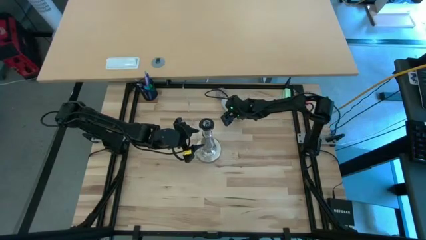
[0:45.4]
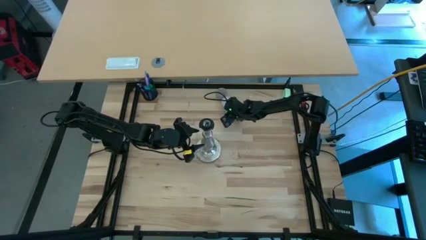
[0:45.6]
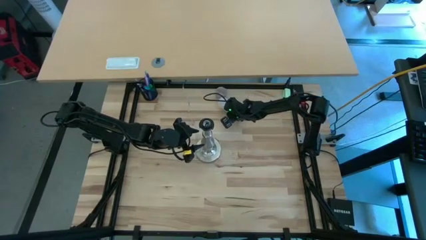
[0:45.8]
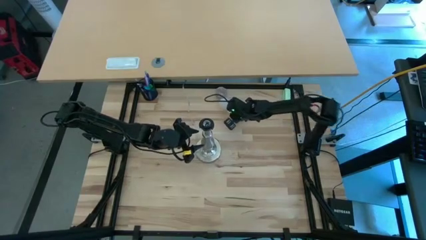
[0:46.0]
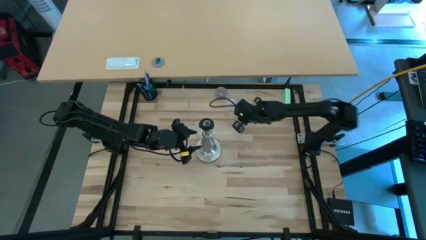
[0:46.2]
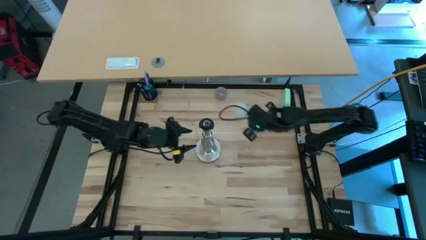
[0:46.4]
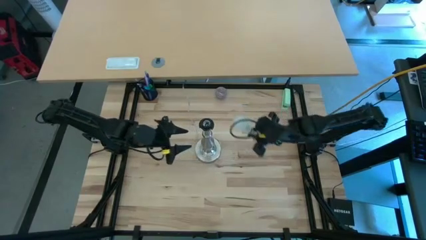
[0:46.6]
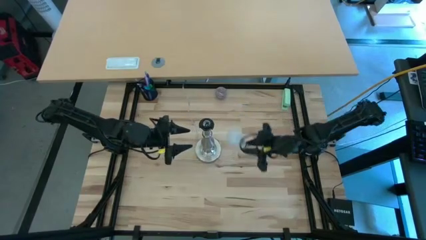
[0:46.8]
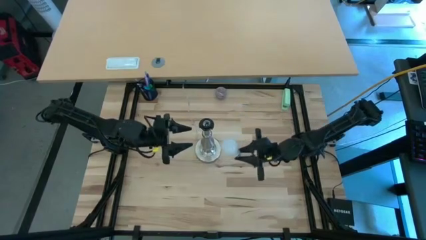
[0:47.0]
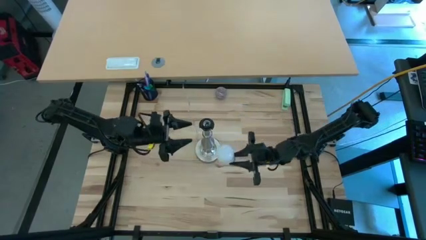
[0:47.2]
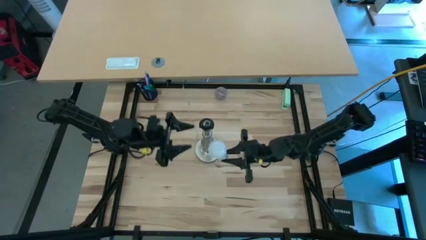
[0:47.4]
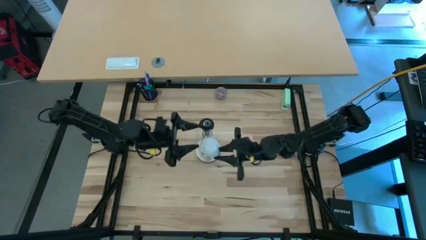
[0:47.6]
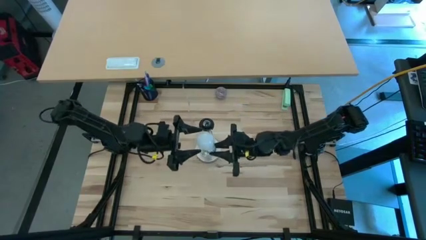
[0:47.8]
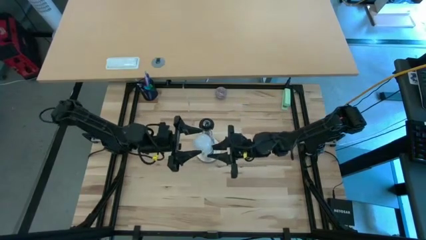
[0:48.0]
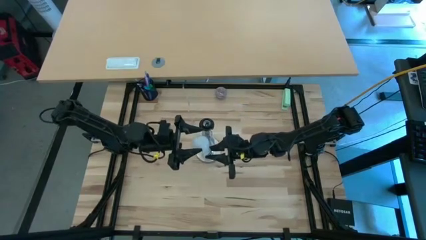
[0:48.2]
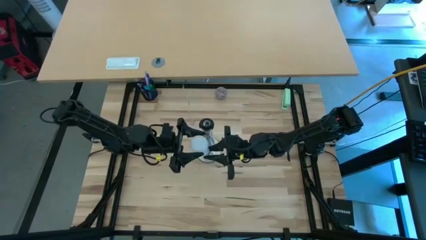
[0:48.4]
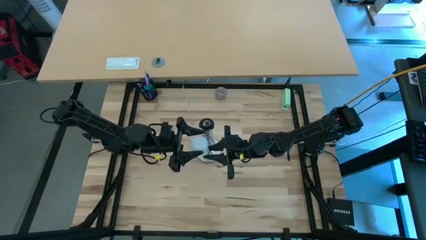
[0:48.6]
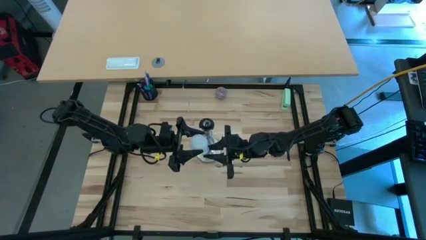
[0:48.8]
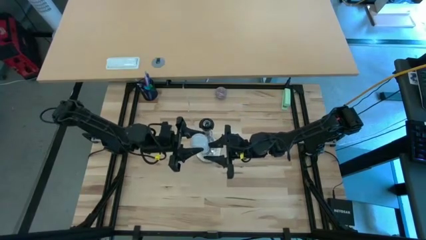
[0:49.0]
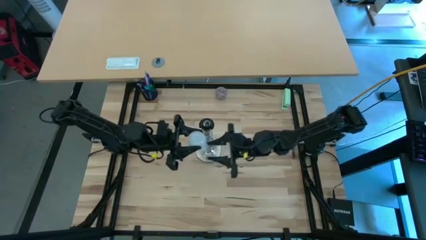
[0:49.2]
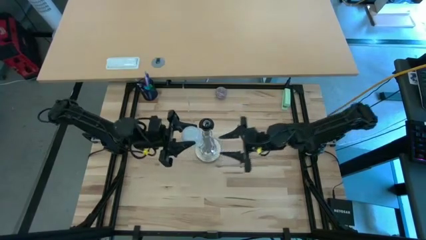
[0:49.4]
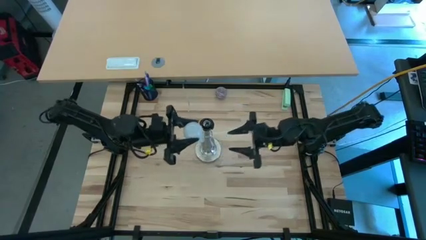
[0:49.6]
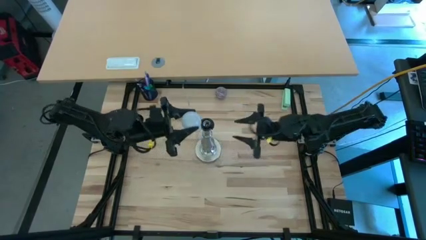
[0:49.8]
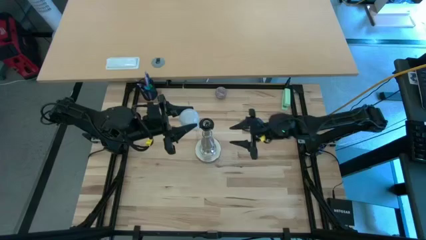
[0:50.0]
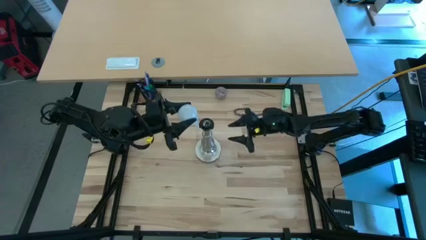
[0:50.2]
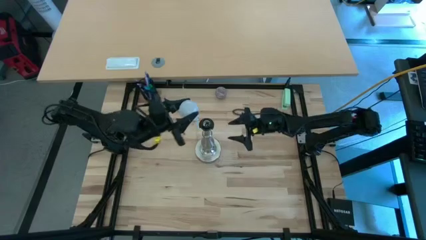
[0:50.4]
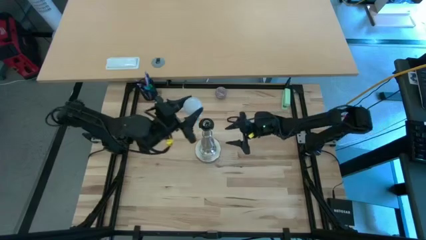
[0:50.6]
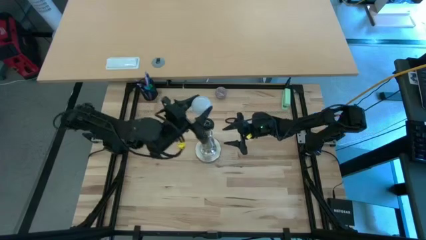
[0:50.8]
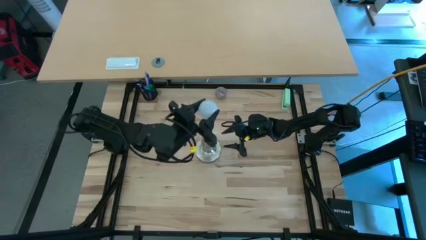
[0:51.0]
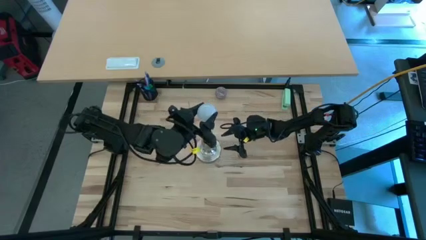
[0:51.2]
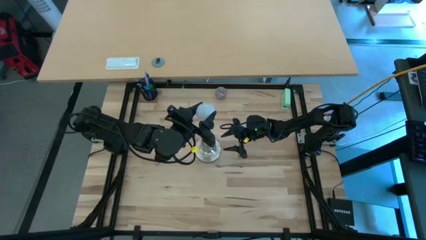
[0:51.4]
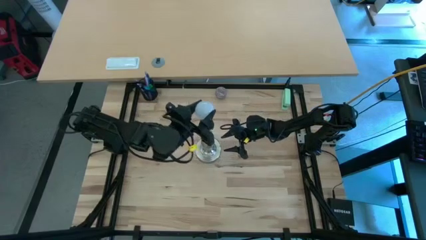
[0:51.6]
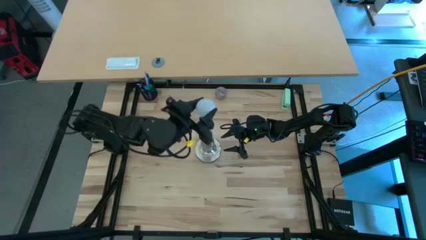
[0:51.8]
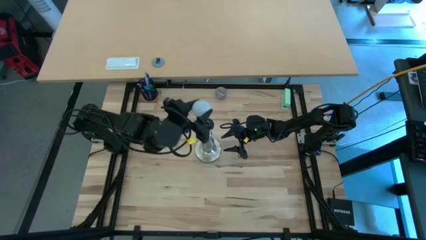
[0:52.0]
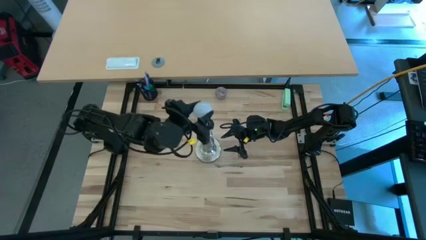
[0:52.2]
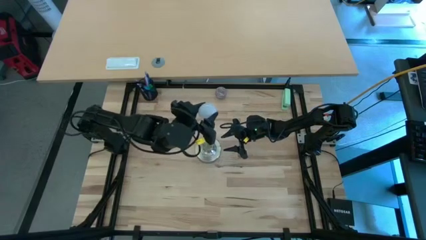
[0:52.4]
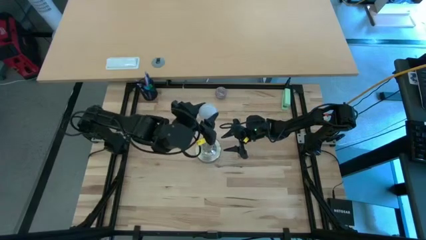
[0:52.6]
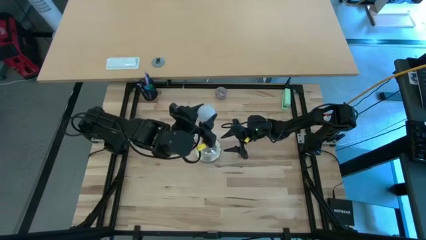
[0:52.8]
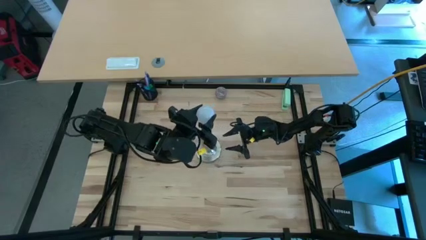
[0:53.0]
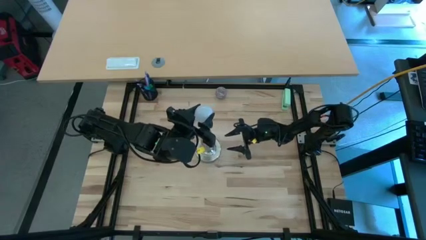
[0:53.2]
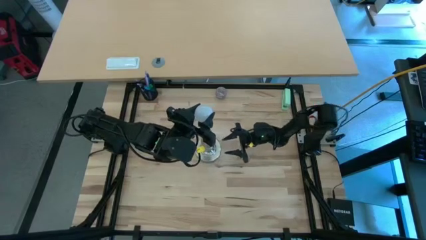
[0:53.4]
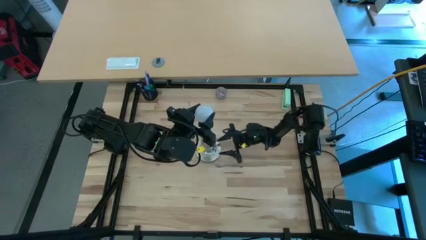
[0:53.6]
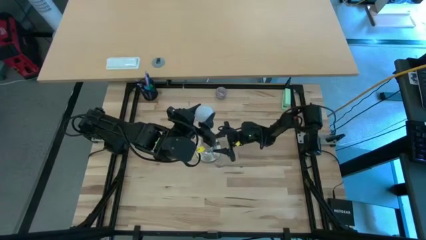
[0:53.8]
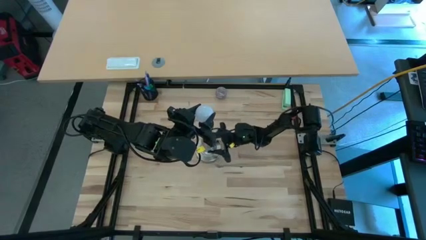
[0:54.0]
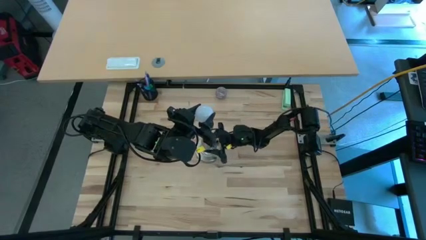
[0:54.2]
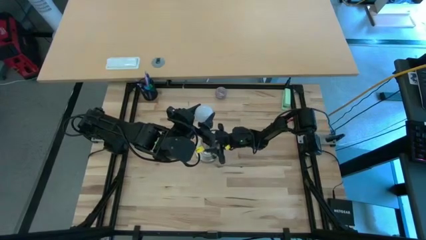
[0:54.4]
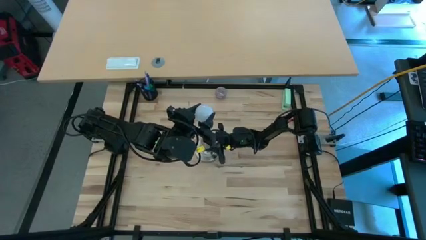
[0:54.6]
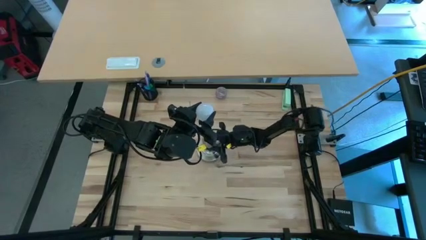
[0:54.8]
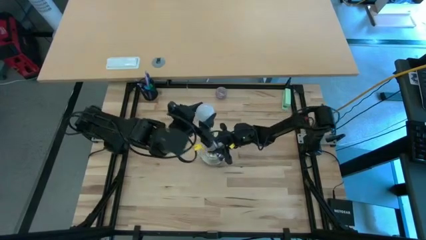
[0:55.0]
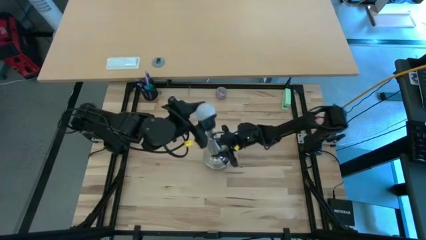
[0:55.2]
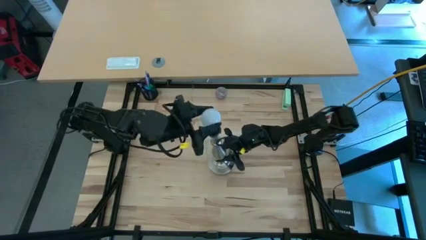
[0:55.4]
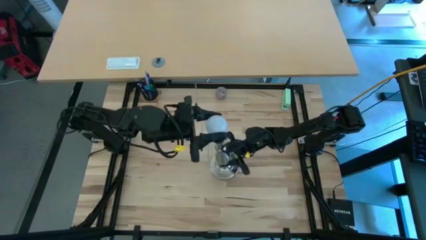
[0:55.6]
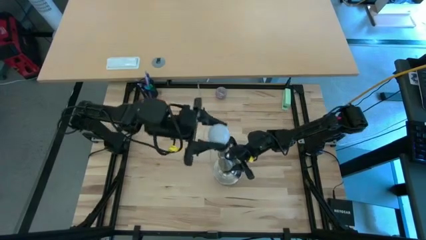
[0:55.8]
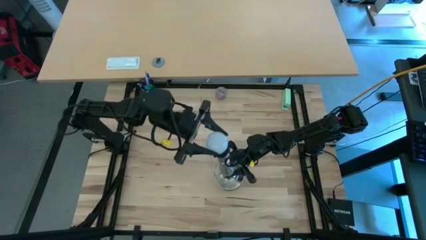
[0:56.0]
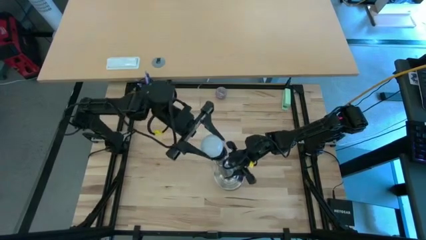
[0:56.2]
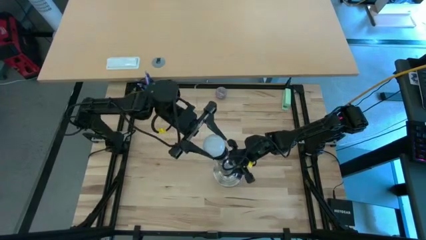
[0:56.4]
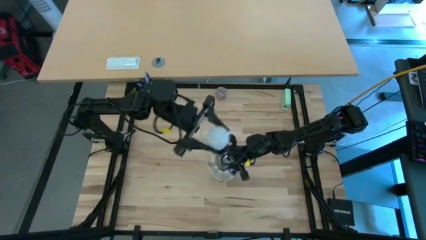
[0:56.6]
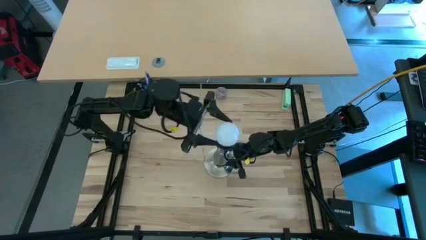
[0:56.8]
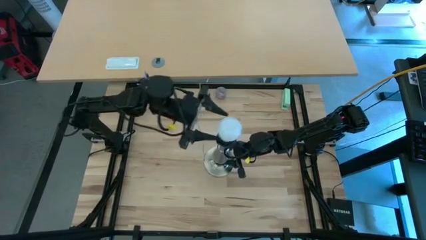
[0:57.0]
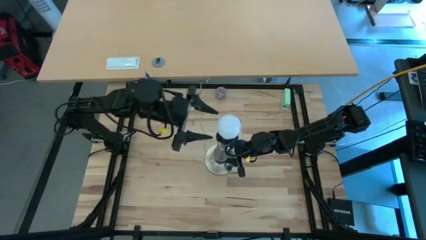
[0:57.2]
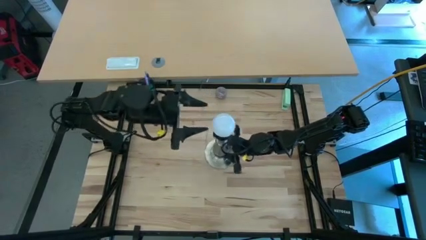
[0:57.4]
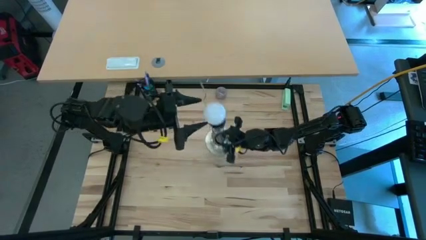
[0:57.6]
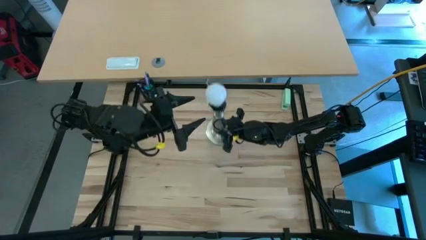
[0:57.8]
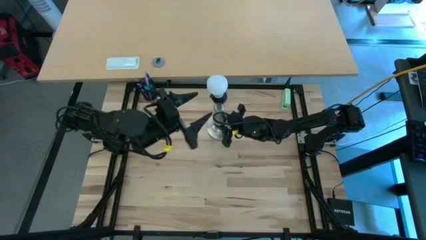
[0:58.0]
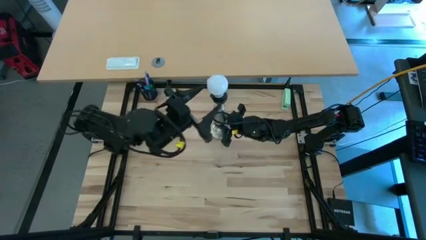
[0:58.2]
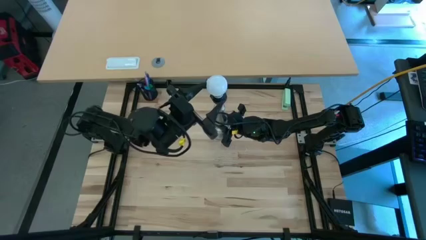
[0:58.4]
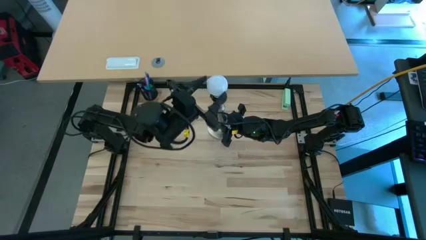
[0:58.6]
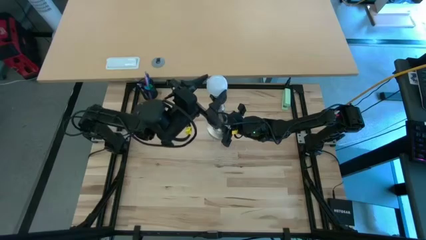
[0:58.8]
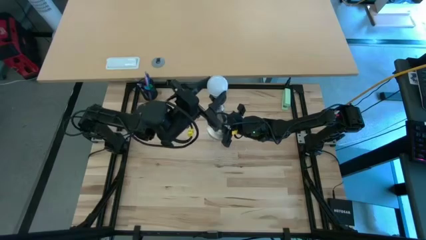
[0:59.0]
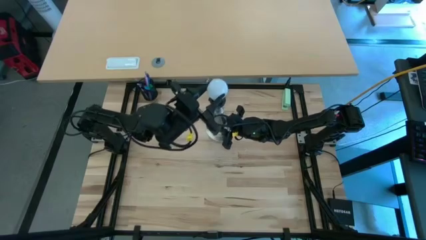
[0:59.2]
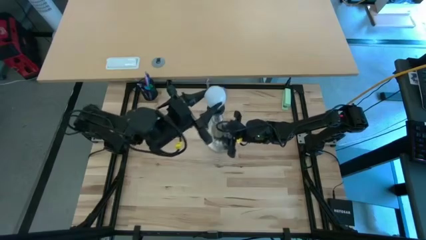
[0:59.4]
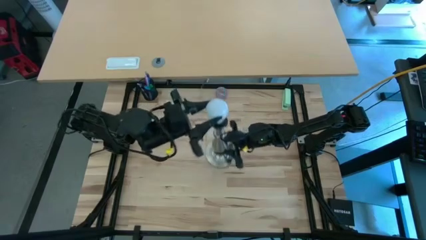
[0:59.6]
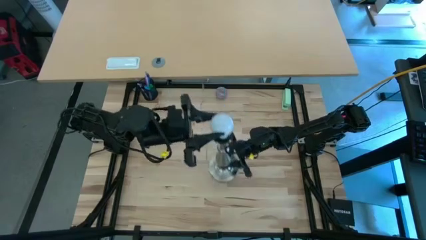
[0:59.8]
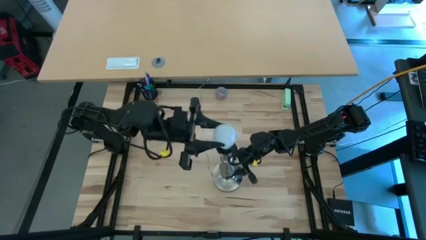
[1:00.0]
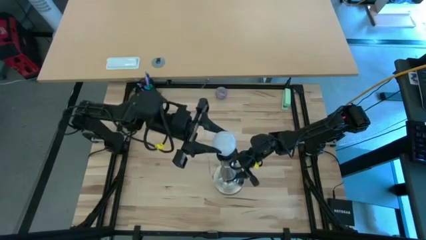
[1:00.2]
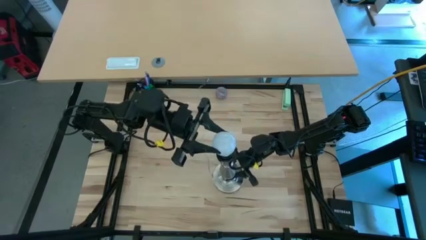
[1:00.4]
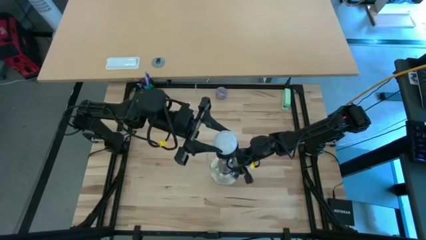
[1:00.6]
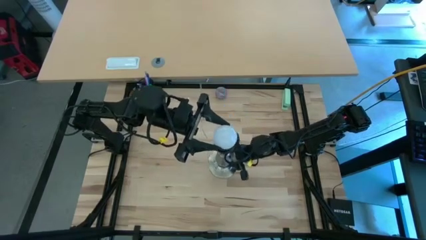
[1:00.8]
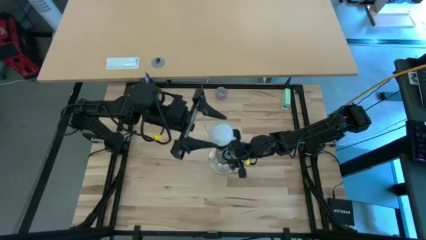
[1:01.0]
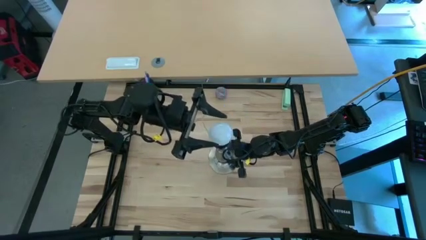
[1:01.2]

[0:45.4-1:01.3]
Task: Screw lightbulb
Insert the lightbulb into the silver lamp
